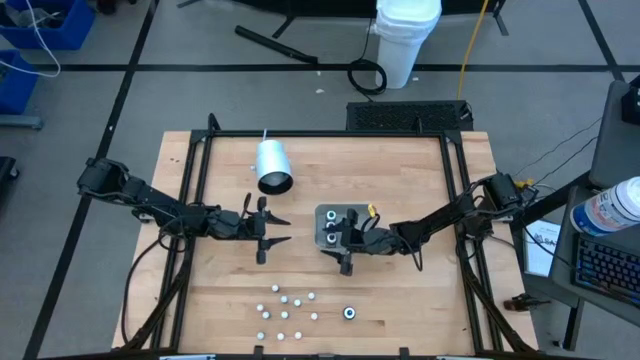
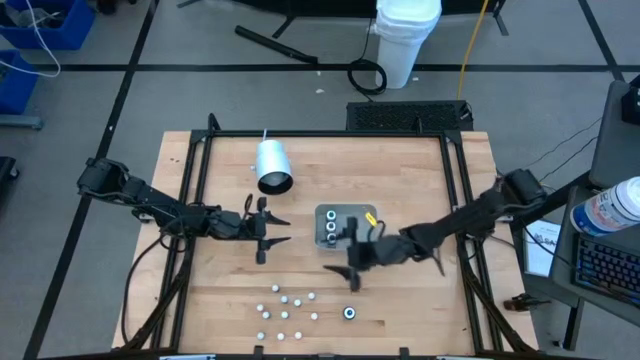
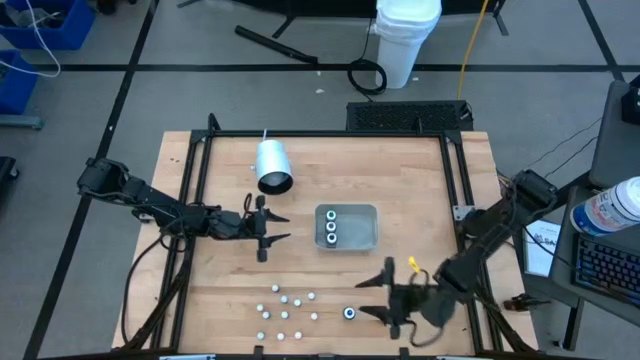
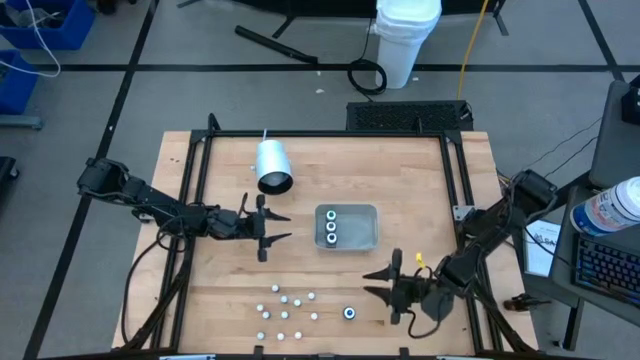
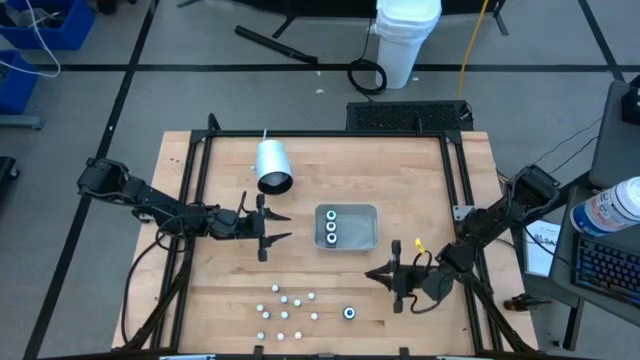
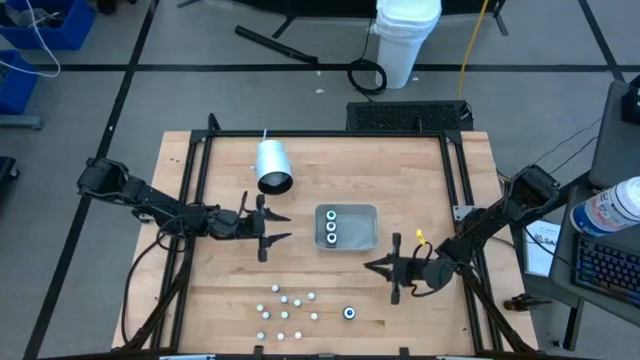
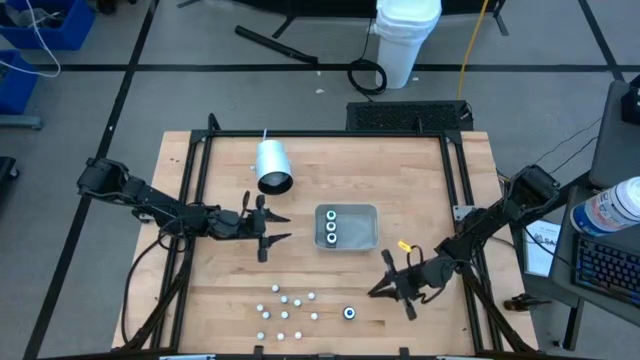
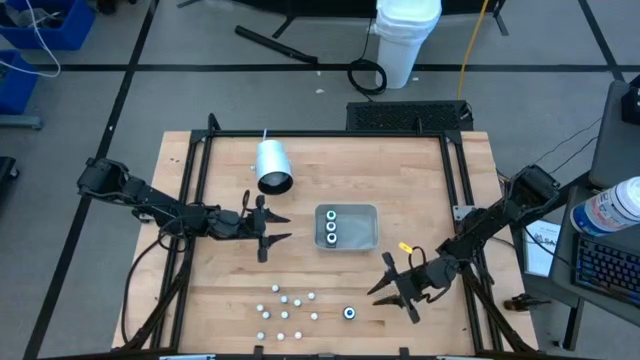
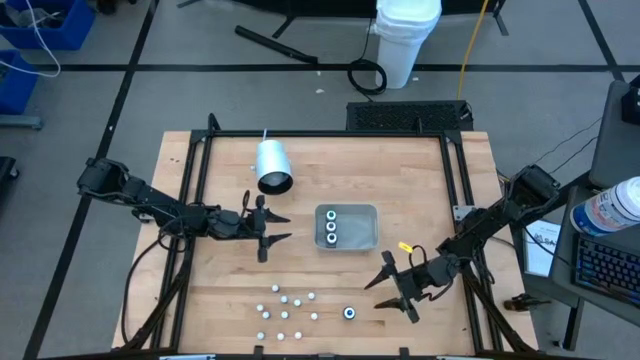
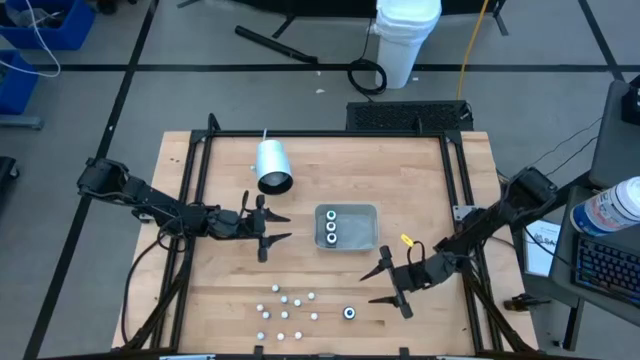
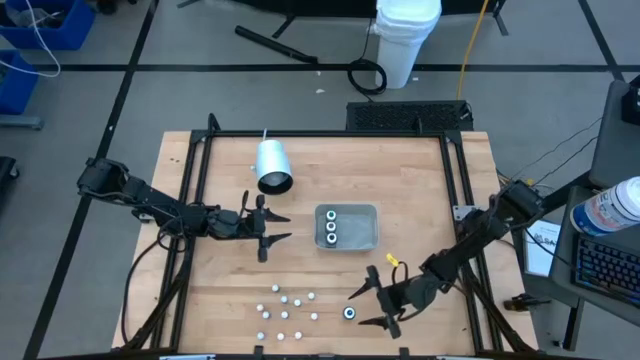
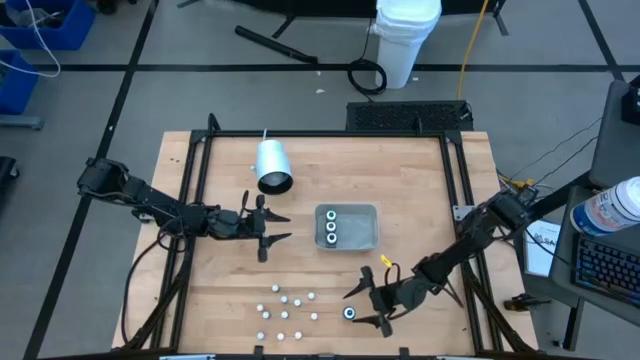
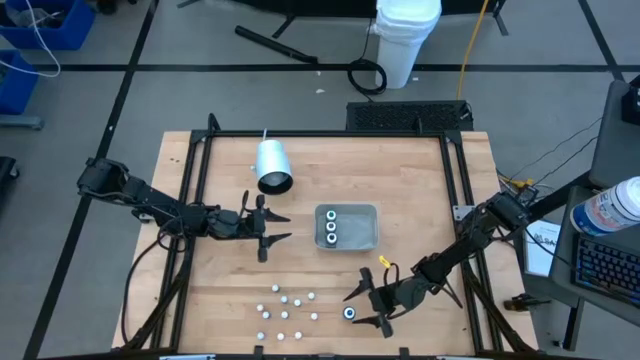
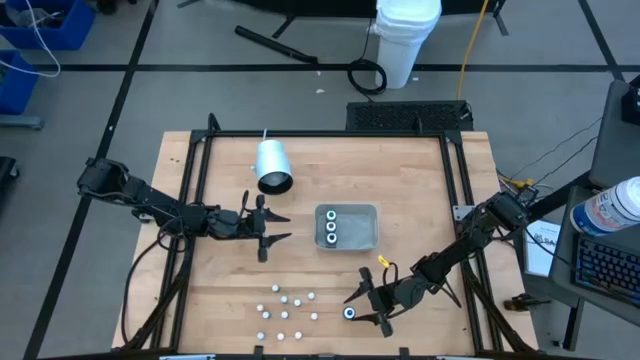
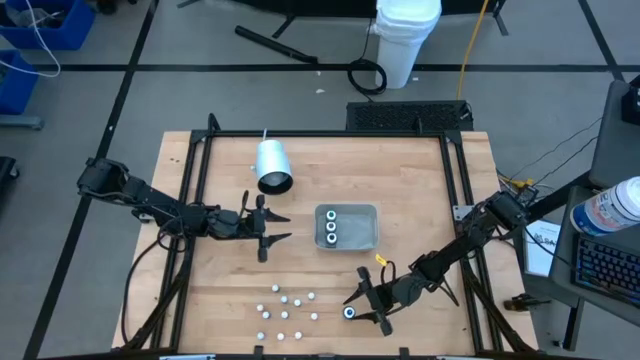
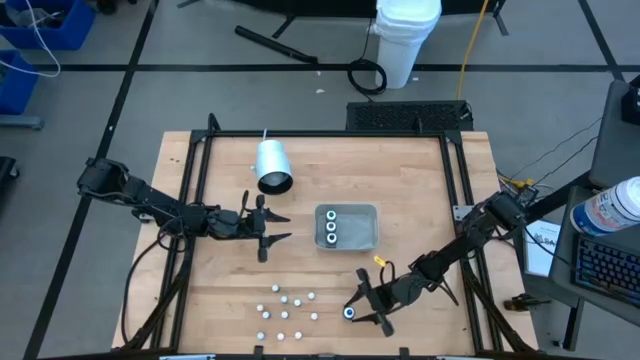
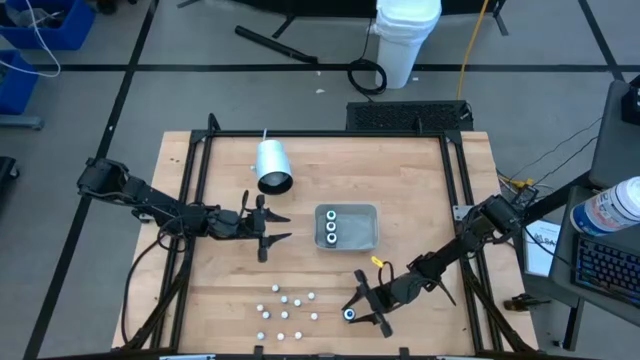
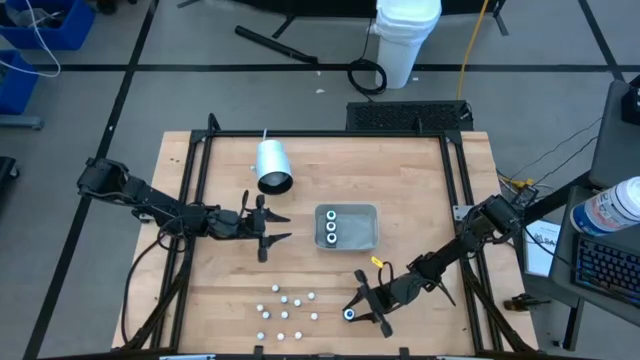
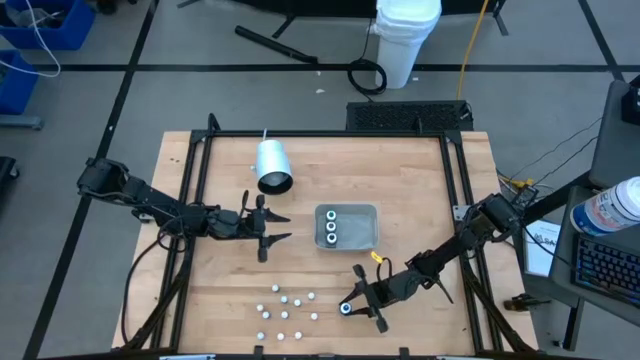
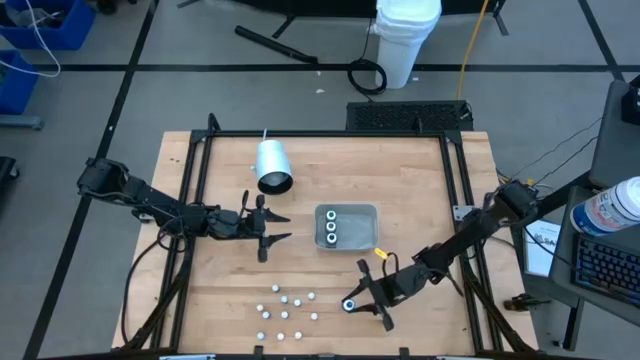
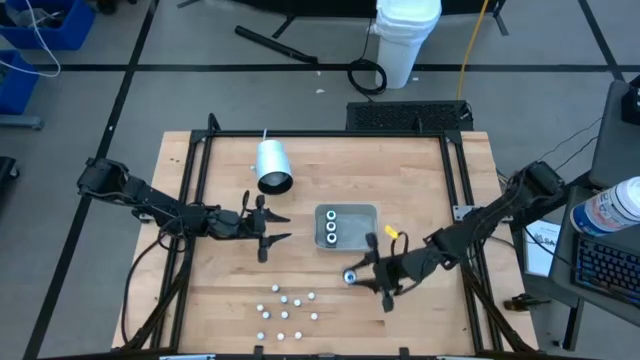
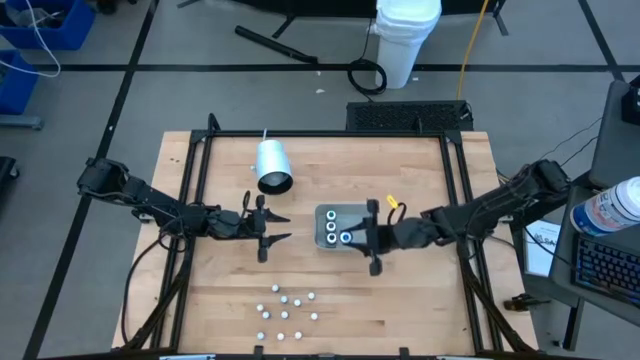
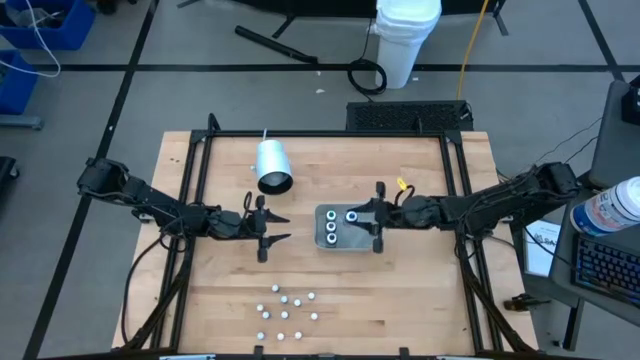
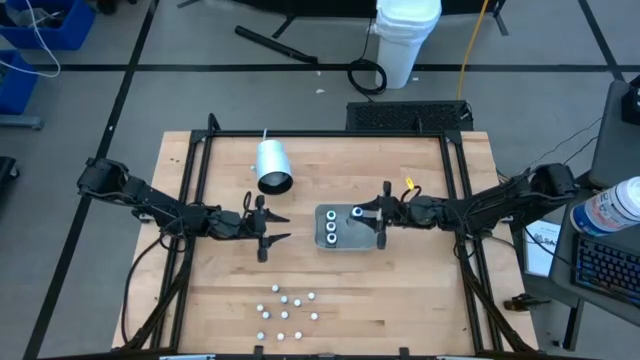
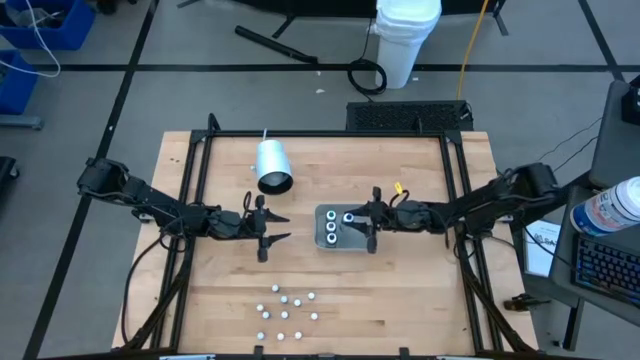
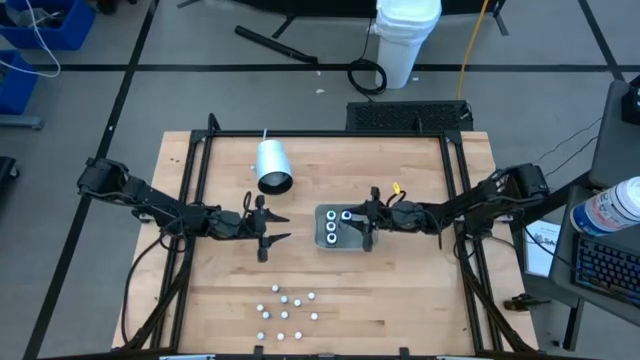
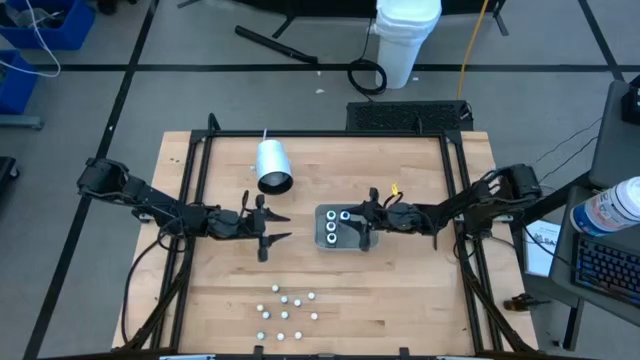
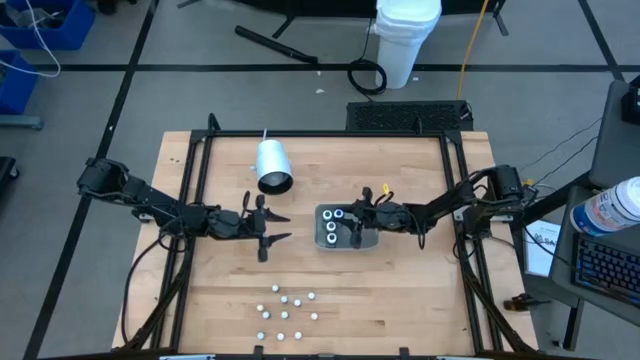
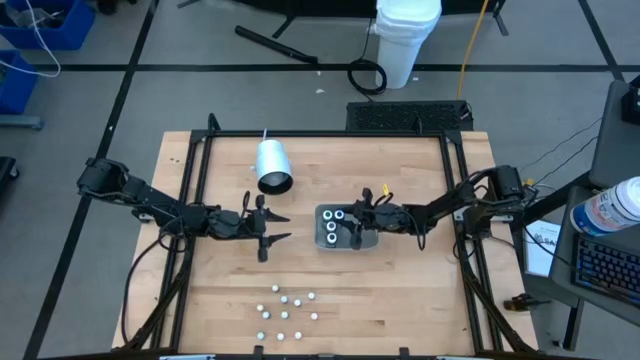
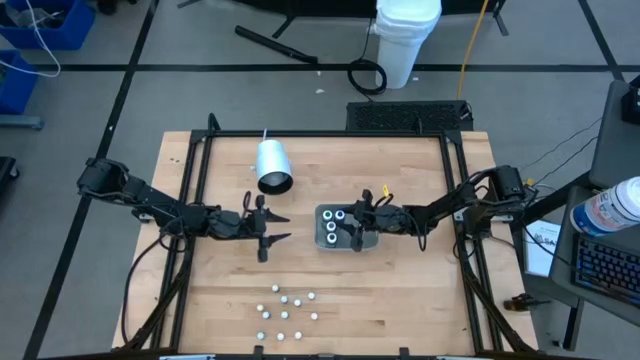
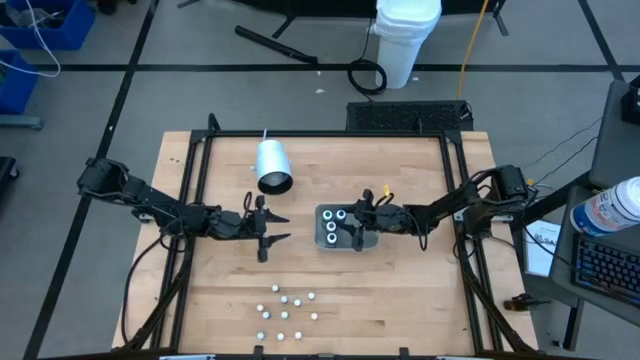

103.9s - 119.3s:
Task: Pick & Place food coloring
Put the large blue food coloring bottle into the white bin

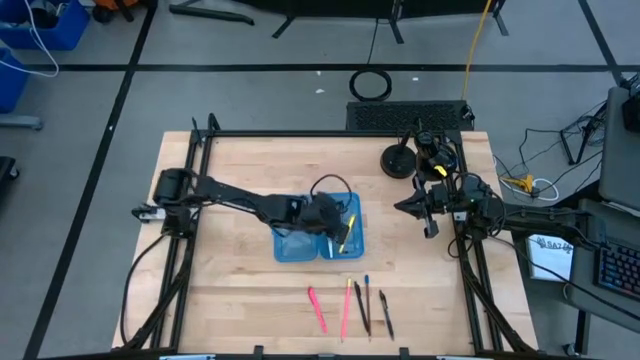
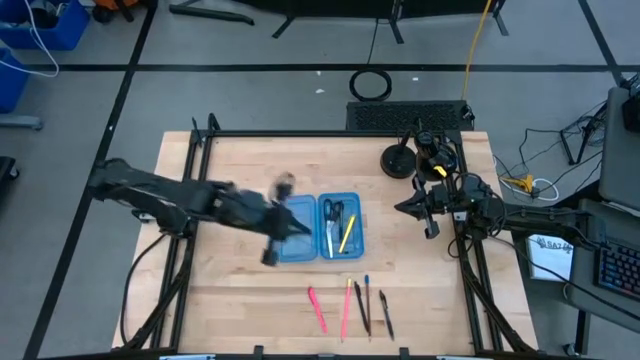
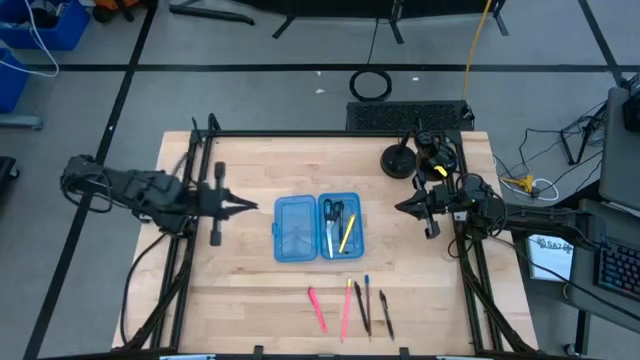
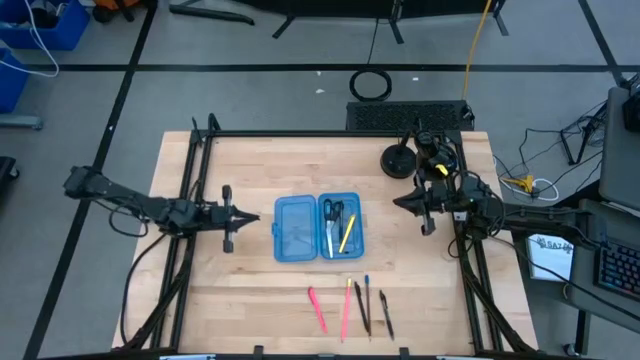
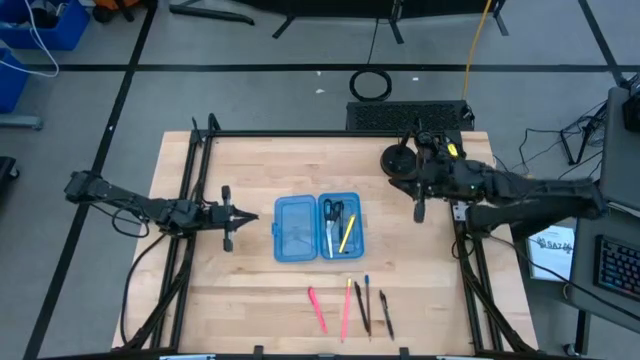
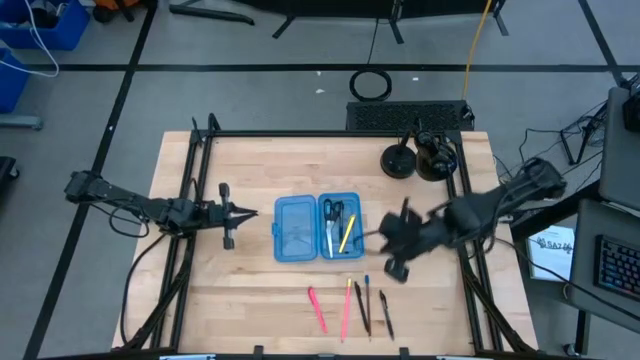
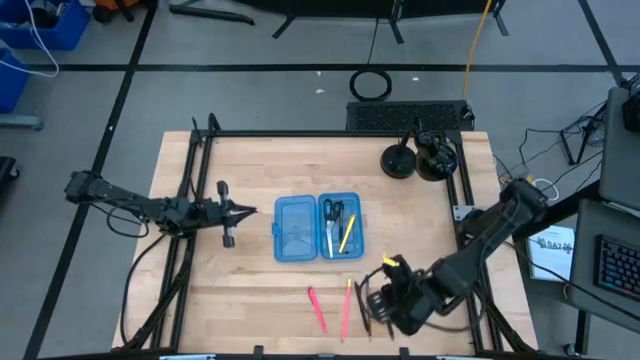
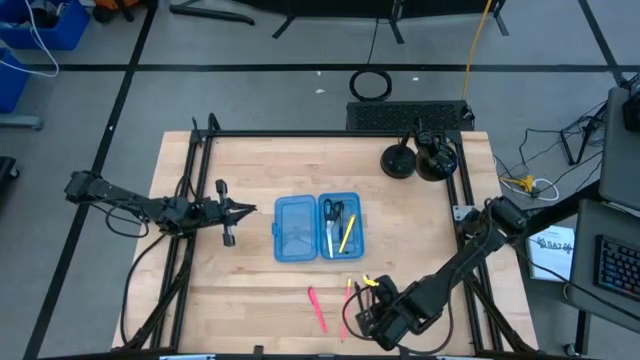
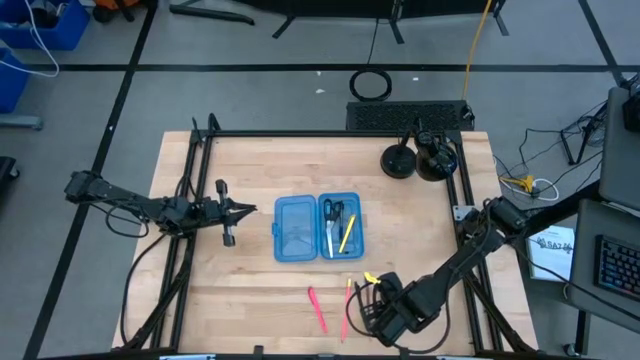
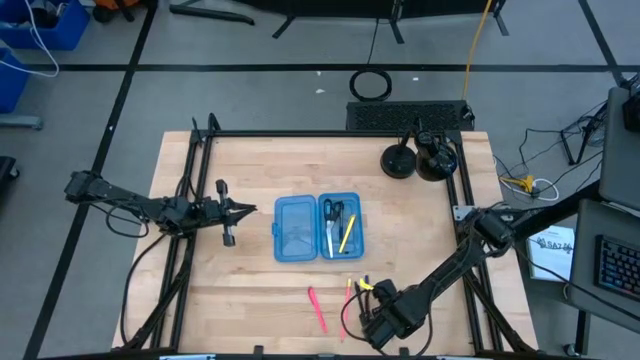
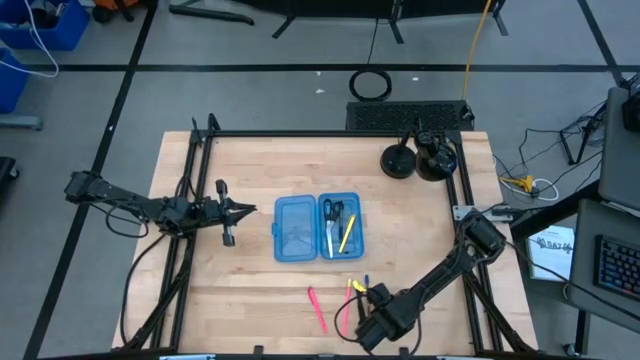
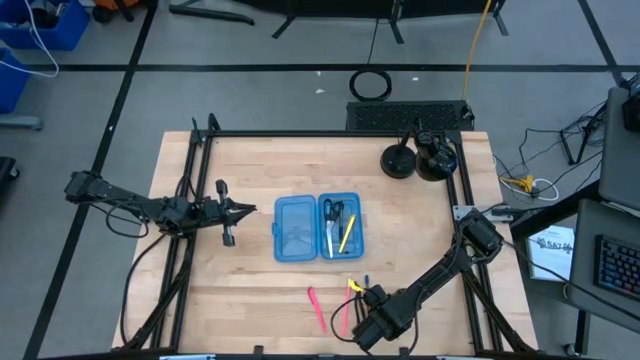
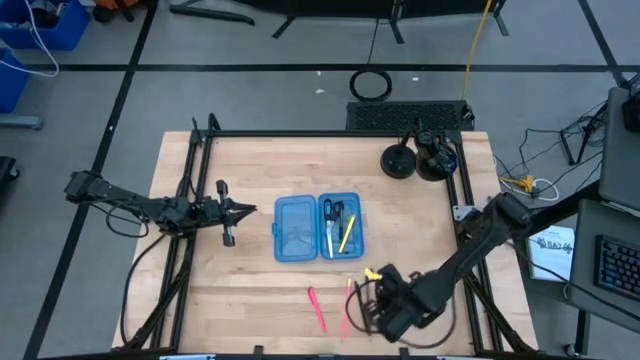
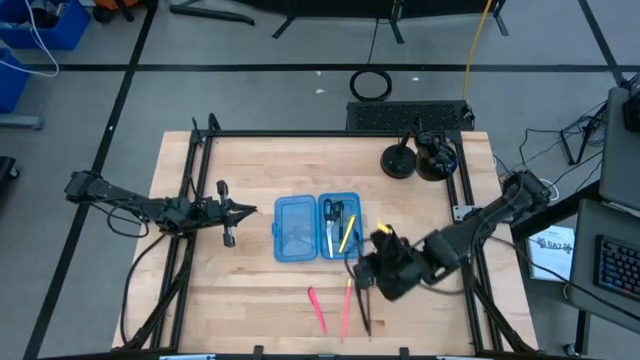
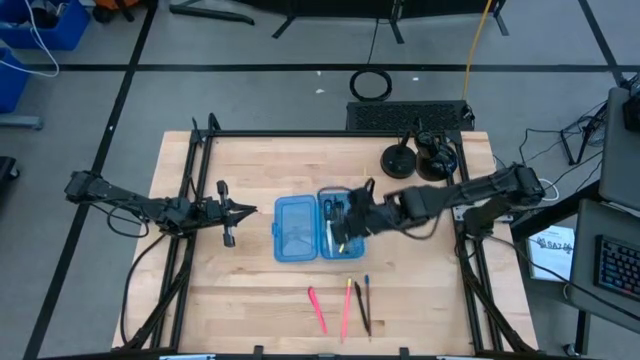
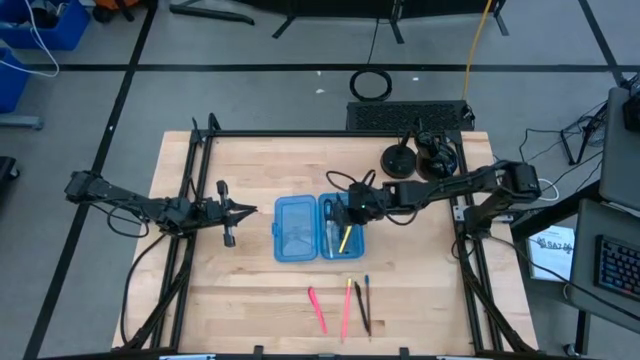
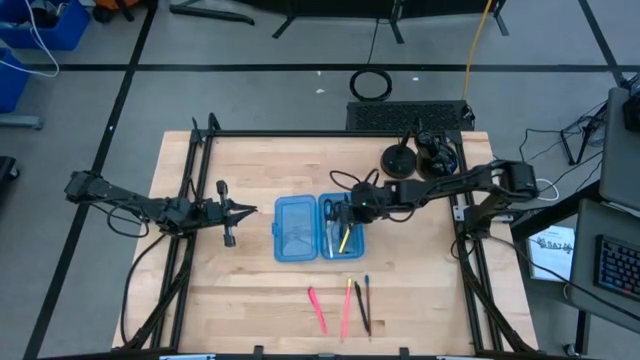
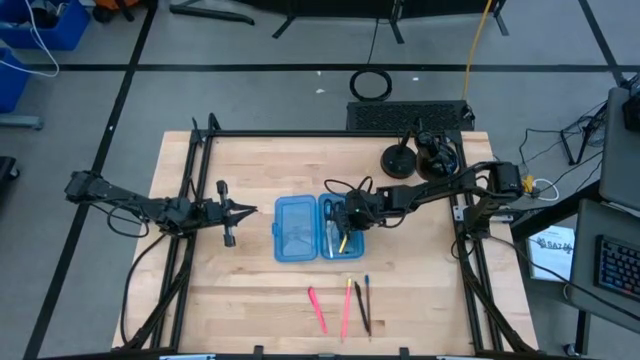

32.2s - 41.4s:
Task: Pick & place school supplies into a supply box
Put the transparent pen into the blue supply box
